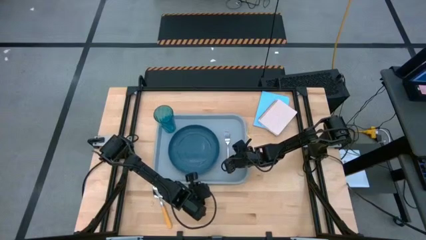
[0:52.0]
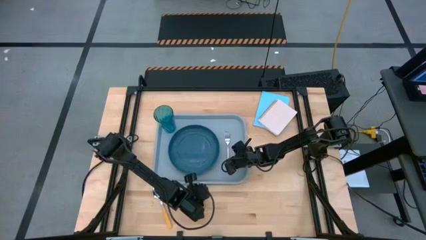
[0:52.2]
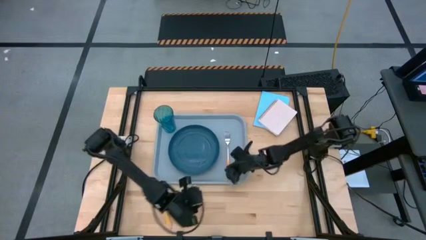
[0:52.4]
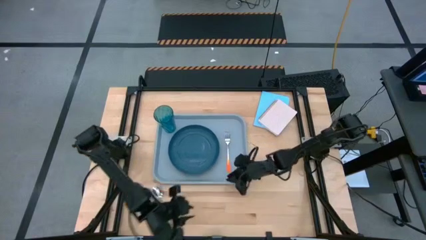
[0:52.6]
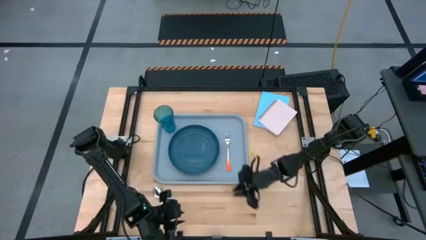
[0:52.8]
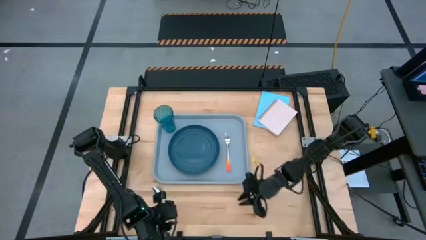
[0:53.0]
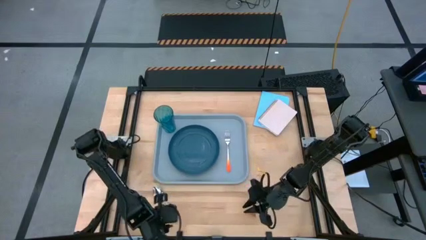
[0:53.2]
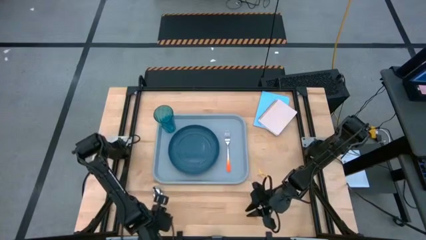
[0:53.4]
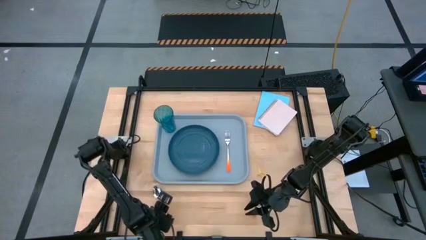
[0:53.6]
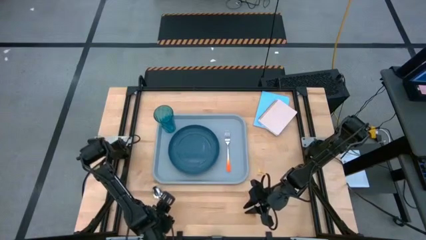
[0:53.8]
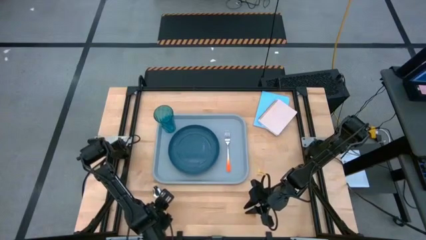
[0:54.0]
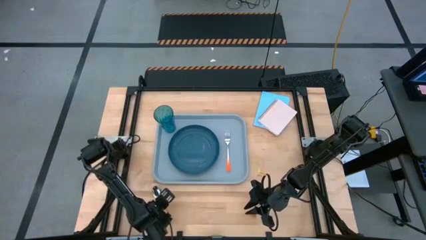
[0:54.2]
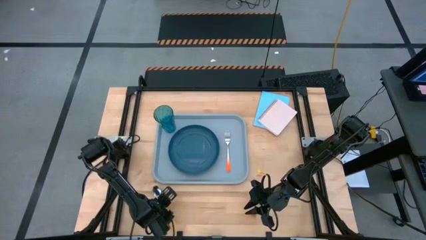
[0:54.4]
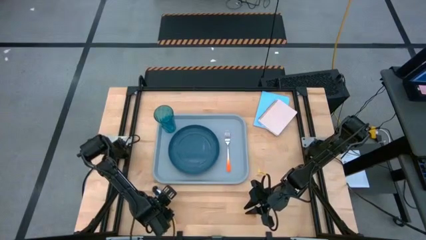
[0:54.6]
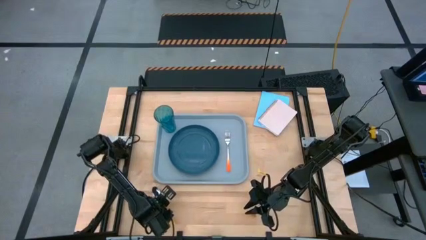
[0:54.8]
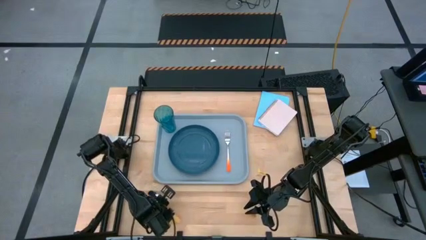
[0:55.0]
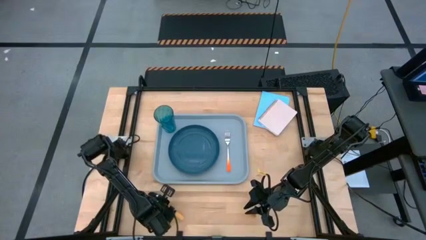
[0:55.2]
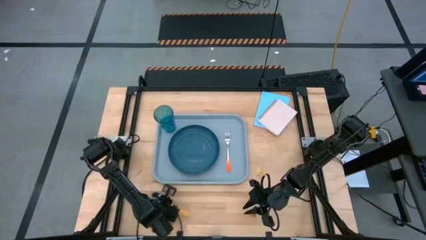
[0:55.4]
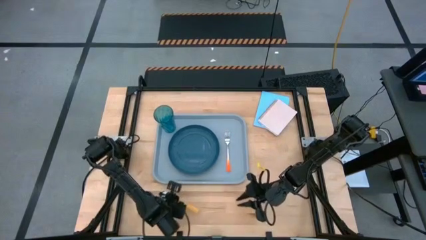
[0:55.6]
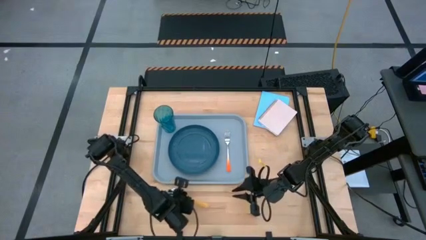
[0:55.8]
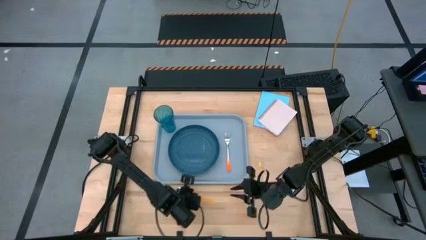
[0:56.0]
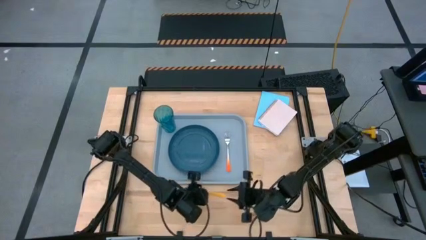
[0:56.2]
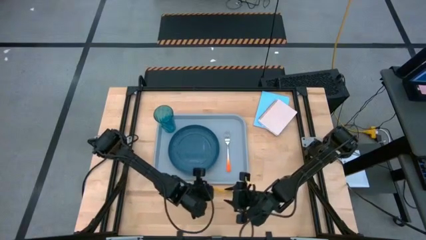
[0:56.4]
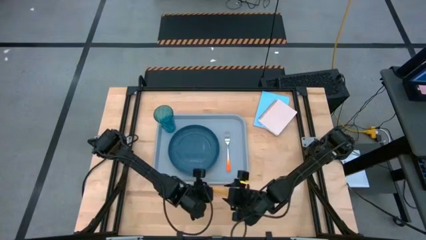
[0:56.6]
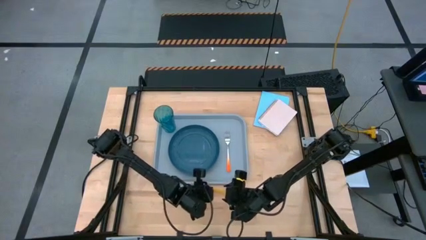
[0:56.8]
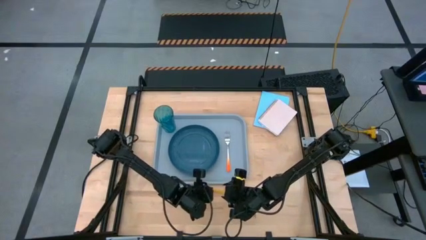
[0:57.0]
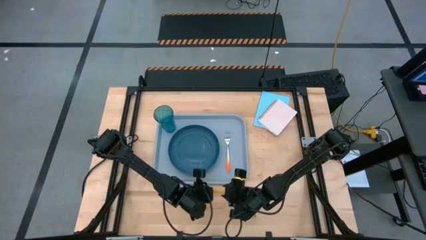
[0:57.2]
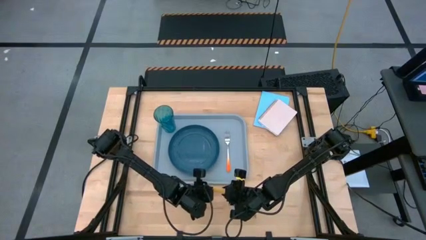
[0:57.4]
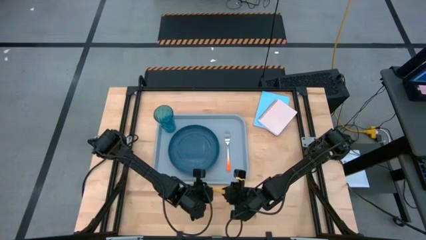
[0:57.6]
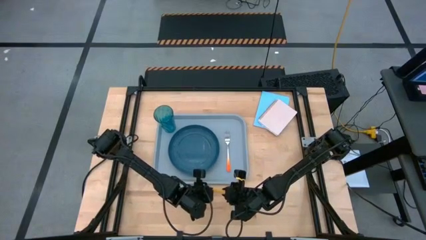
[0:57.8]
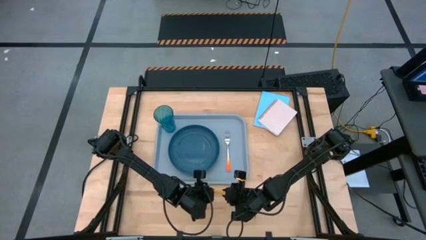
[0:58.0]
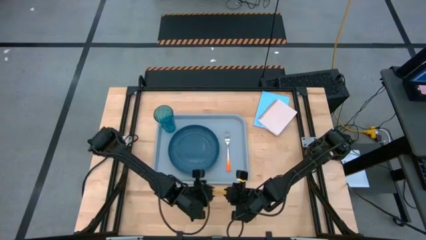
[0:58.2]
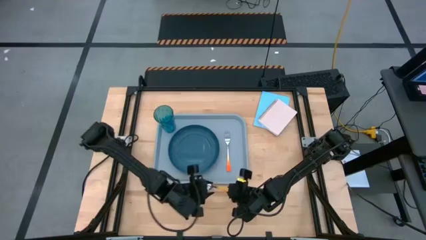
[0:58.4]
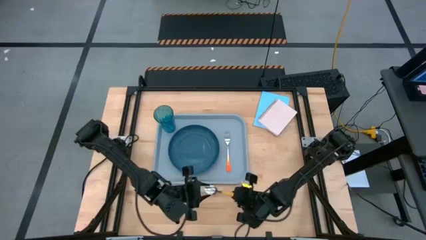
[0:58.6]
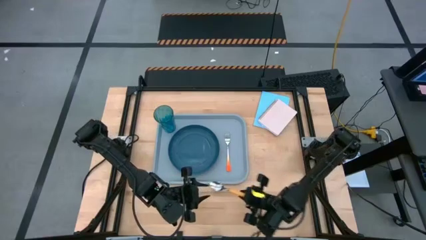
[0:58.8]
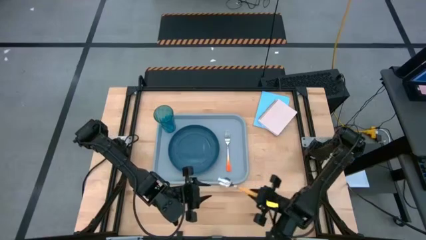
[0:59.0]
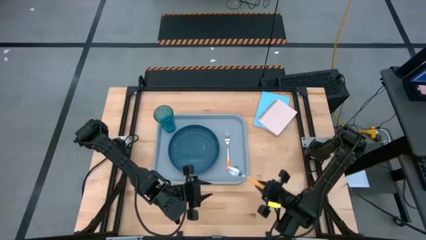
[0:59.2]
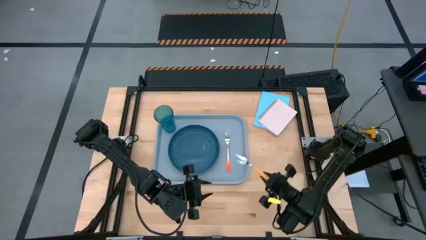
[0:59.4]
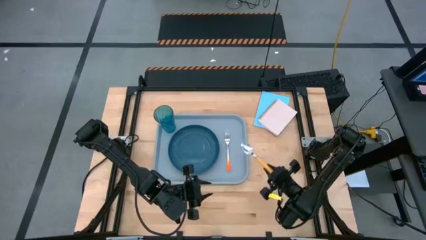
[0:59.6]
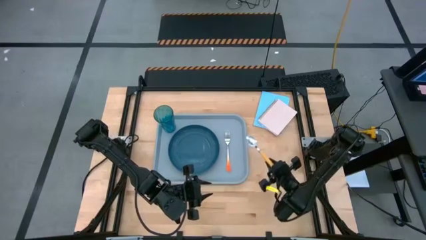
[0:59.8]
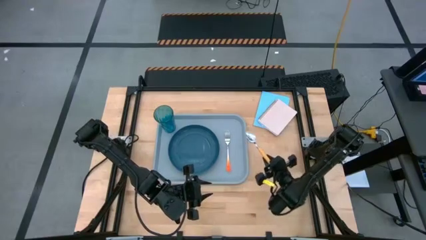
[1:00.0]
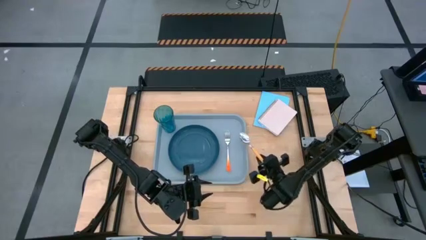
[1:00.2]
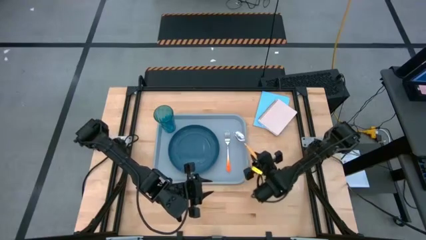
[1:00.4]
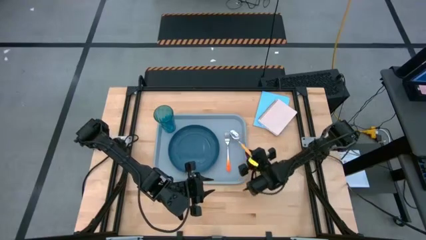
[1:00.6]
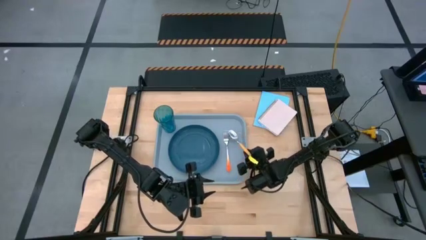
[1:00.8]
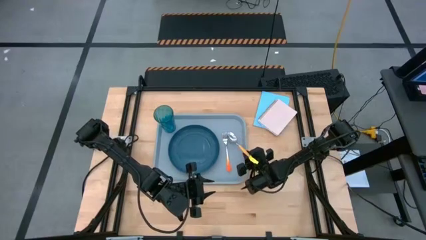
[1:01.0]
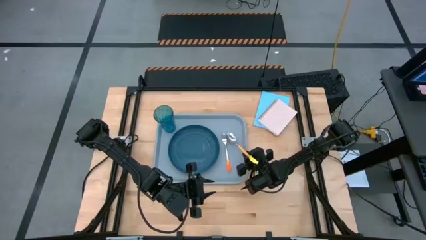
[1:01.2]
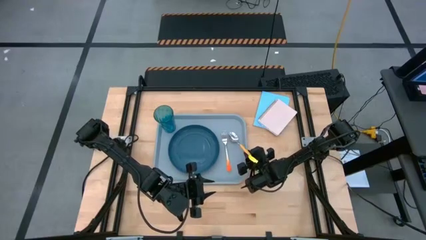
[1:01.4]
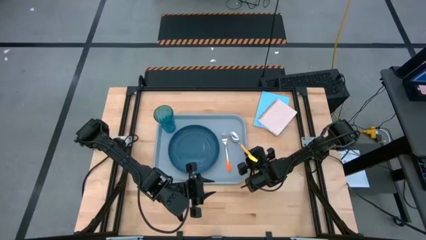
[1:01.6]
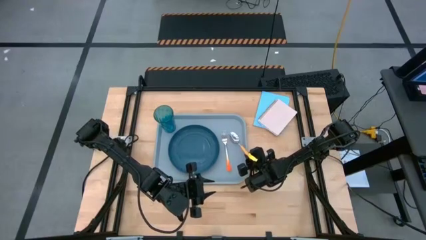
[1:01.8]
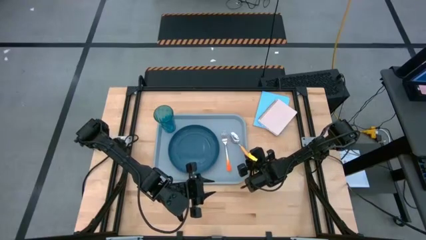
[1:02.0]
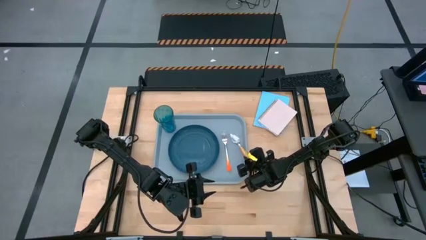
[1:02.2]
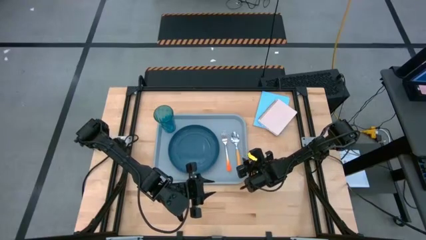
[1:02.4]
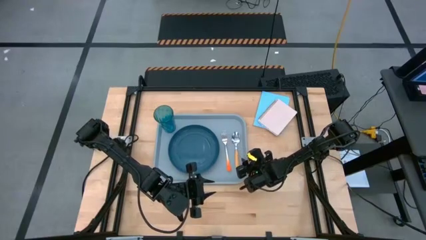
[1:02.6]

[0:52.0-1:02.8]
Task: Pick and place plate/cup/fork/spoon on tray
Put the yellow spoon to the right of the orange fork on the gray serving tray

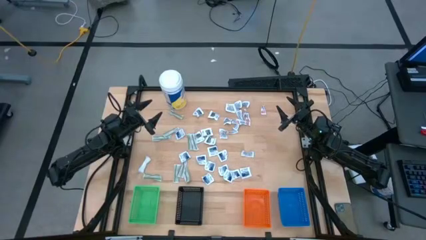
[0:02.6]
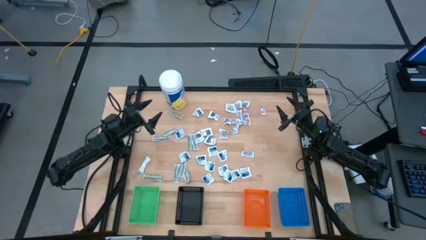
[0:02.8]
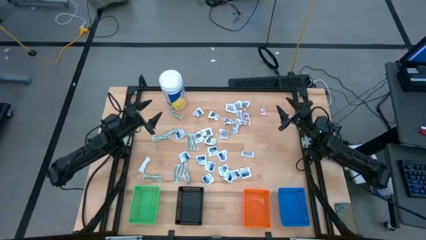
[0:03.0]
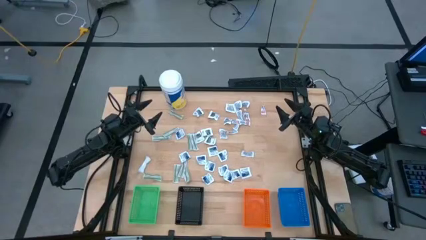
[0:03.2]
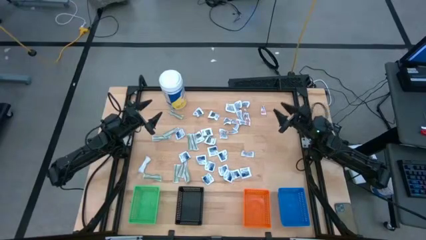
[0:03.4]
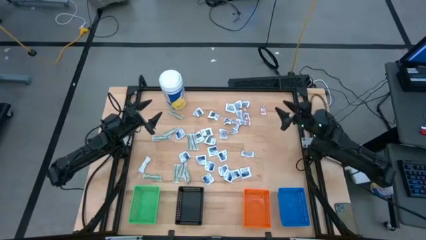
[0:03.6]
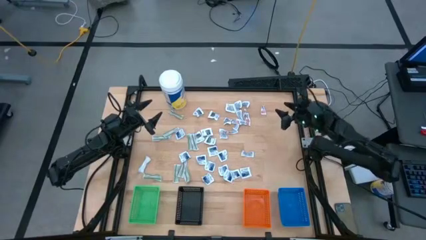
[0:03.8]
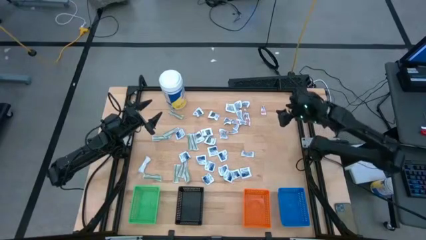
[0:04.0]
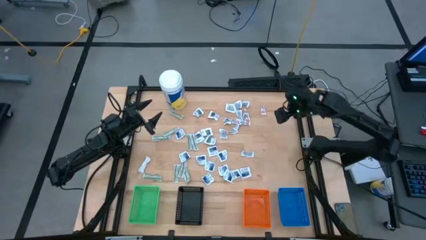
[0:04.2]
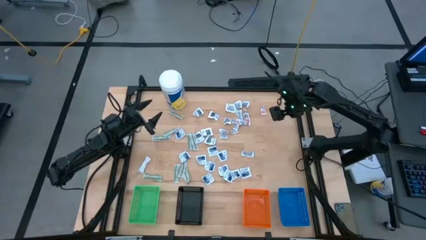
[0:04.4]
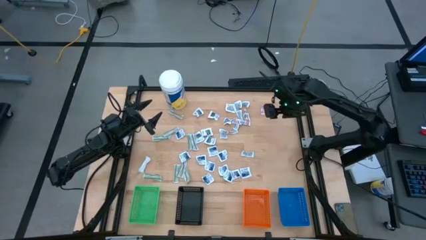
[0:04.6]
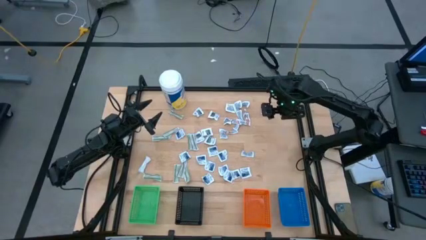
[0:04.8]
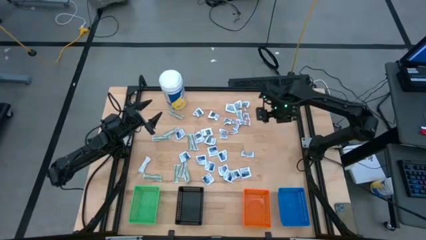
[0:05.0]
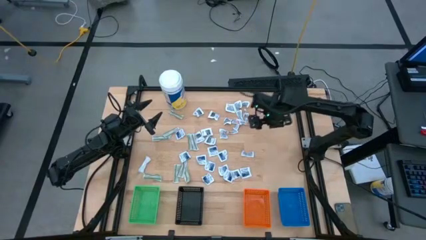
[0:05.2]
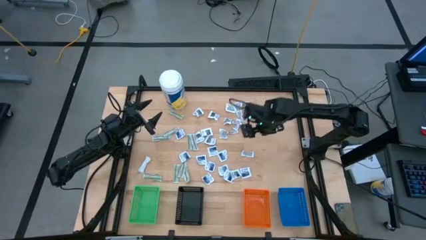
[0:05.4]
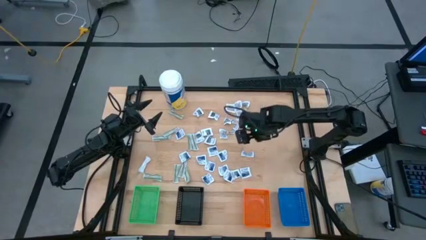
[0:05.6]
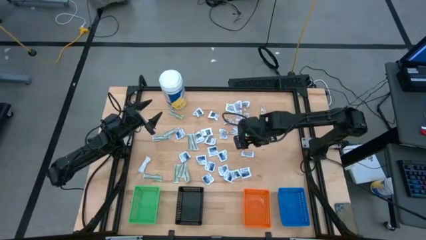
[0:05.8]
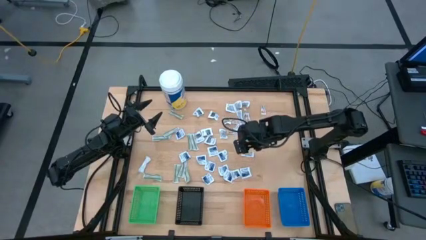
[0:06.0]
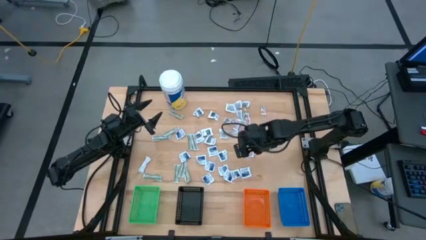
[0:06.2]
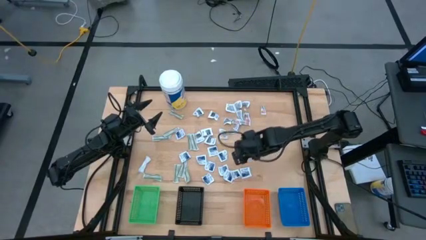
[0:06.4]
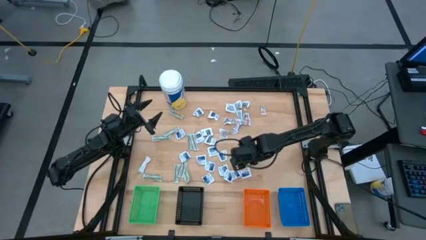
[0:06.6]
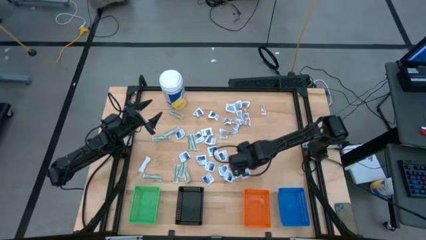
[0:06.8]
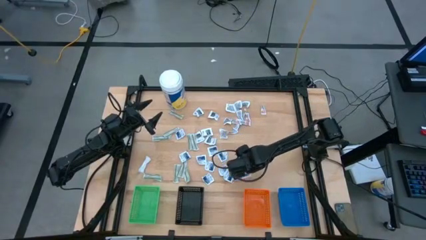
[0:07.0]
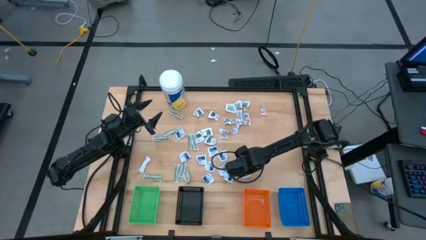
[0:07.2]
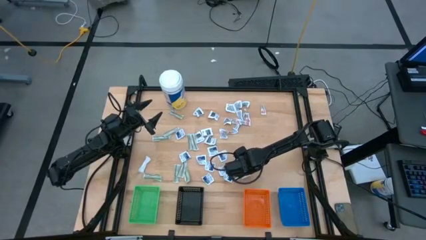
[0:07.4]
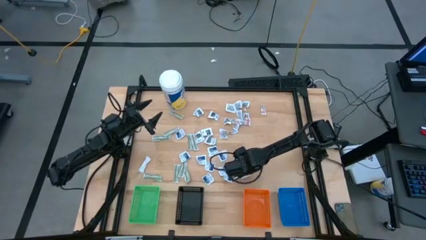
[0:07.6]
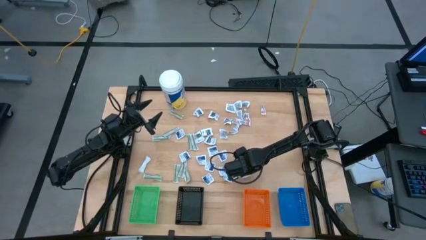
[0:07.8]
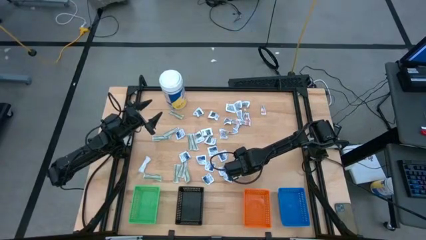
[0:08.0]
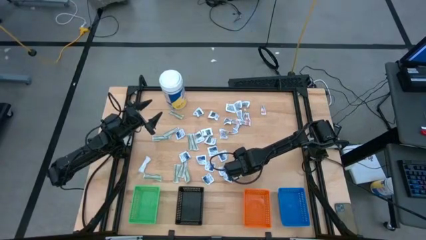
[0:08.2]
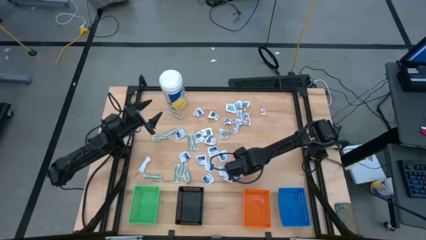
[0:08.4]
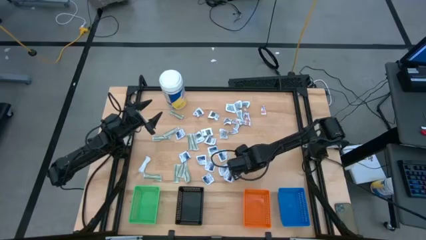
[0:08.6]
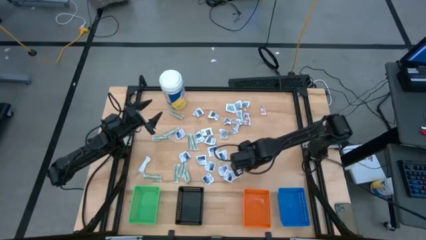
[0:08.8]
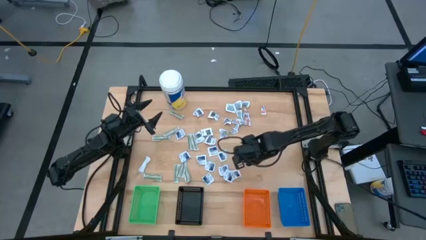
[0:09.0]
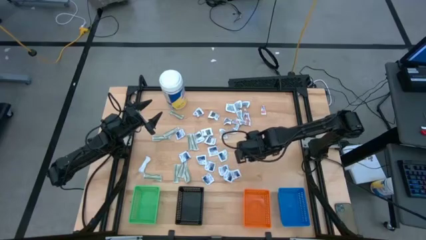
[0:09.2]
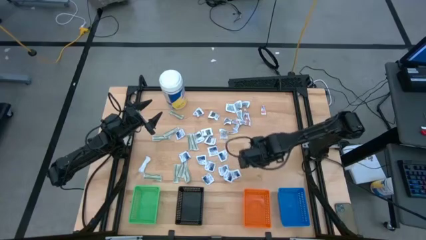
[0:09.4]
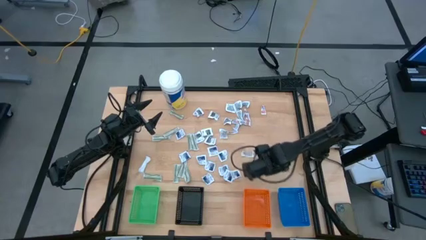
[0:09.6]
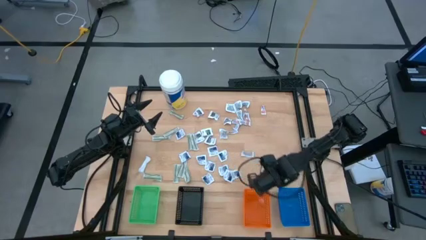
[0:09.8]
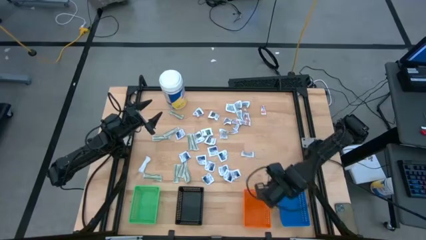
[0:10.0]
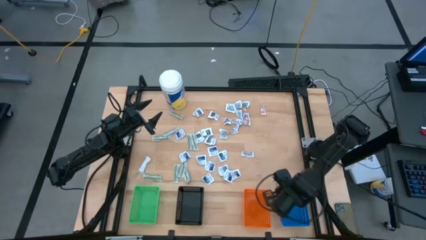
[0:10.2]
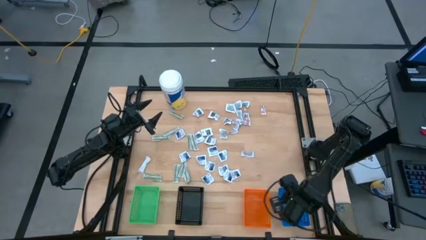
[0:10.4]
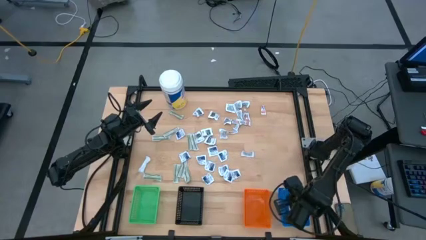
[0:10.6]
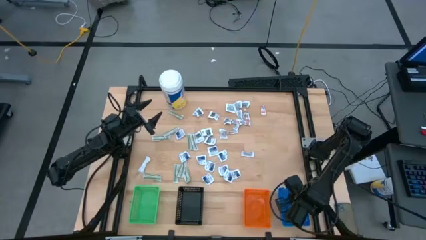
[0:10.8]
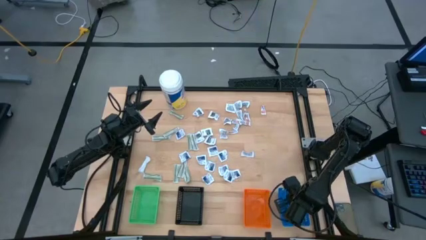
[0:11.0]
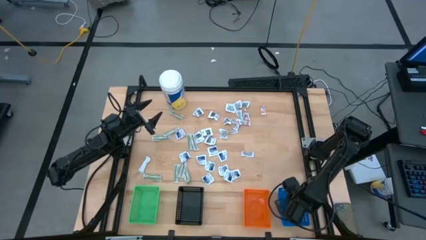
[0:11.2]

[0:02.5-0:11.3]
Task: Pick & Place First Aid Supplies
Put the alcohol pad into the blue bin
